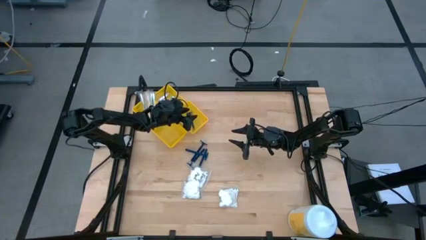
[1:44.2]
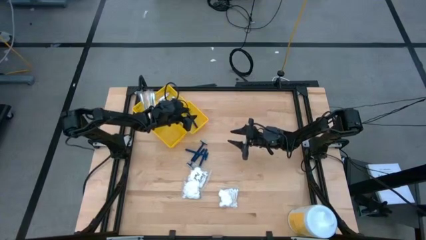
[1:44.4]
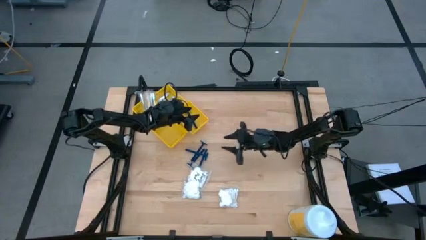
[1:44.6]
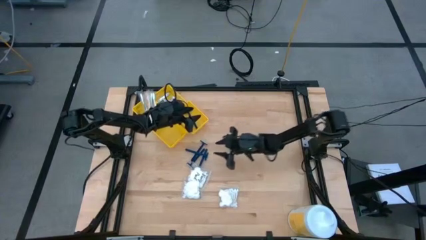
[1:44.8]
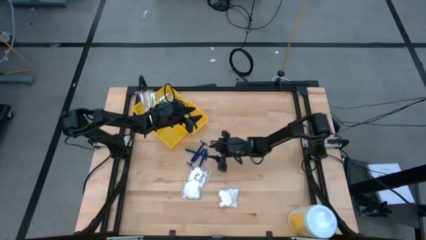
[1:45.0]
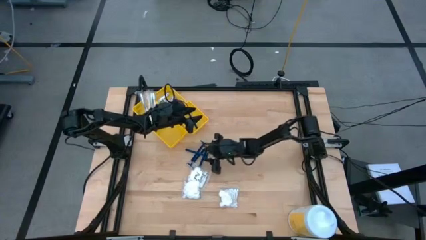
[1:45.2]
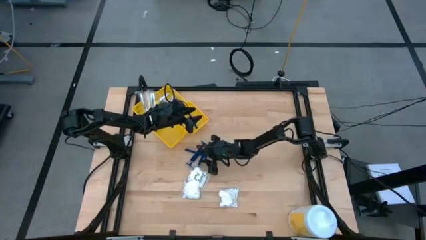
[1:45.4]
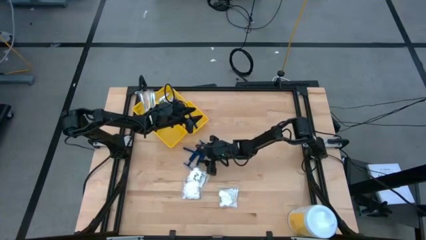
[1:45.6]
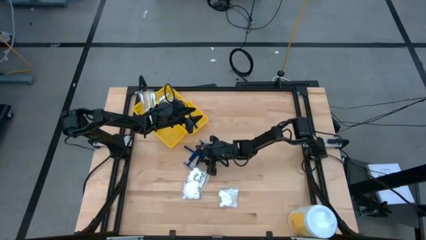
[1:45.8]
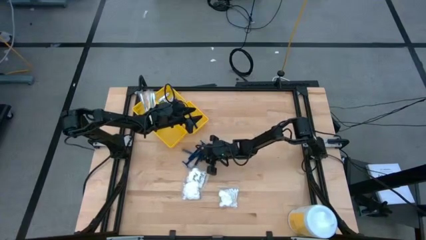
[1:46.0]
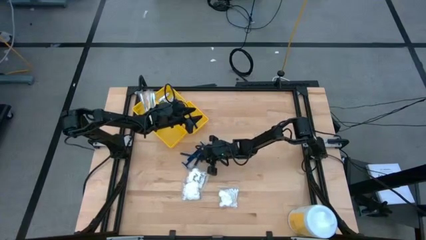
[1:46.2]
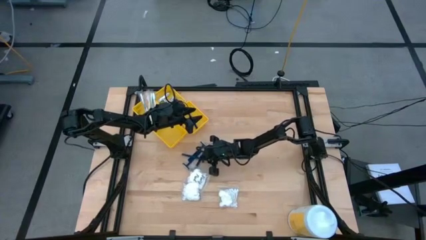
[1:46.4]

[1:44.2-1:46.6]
Task: Pick & Place Travel size toiletries
Put the blue razor into the middle right yellow bin

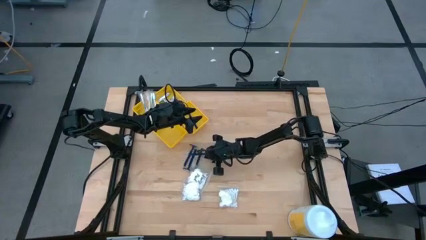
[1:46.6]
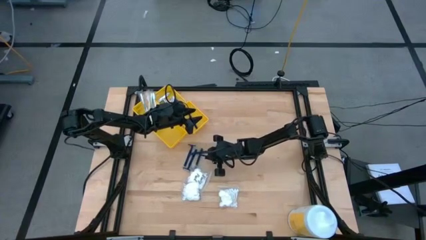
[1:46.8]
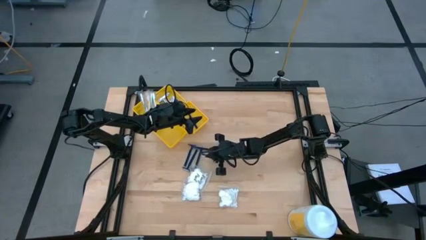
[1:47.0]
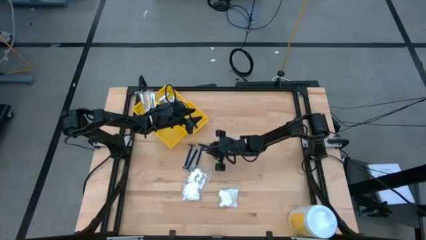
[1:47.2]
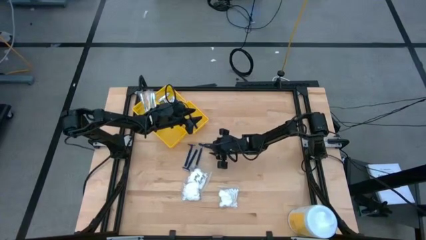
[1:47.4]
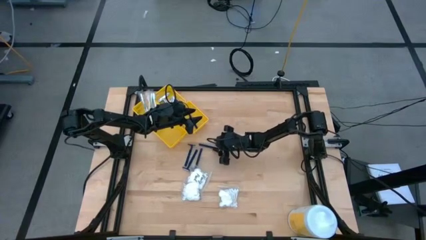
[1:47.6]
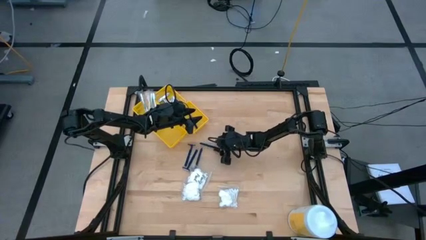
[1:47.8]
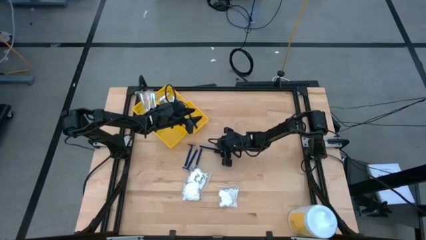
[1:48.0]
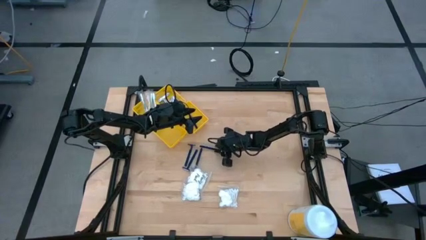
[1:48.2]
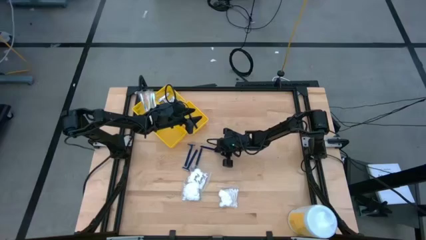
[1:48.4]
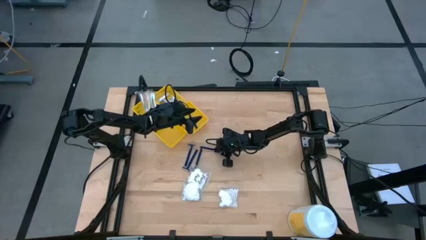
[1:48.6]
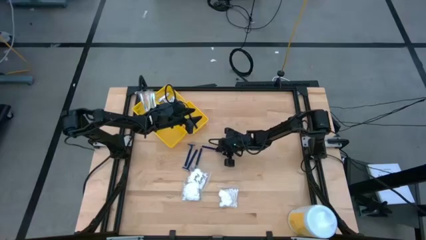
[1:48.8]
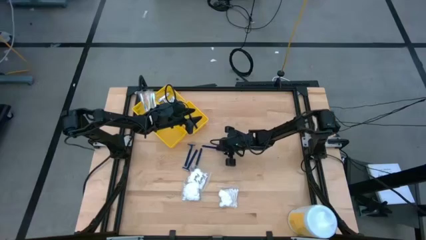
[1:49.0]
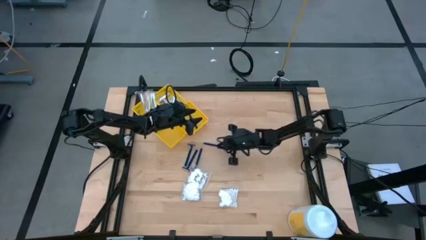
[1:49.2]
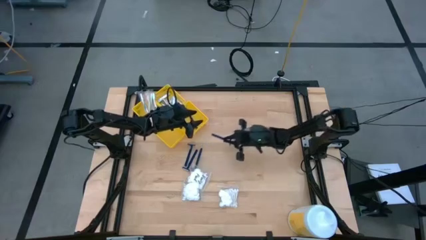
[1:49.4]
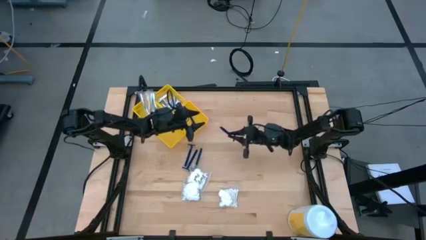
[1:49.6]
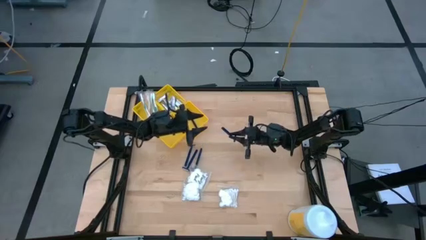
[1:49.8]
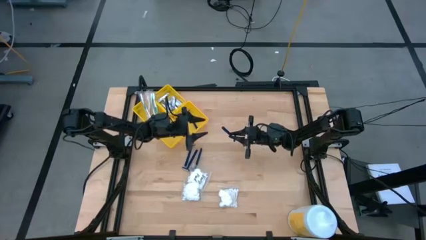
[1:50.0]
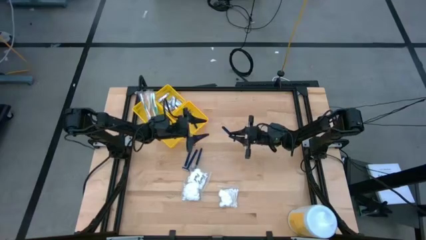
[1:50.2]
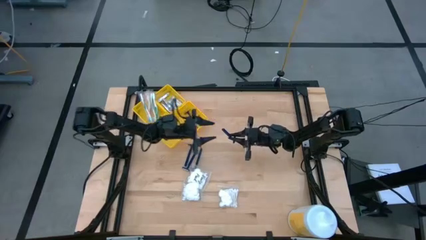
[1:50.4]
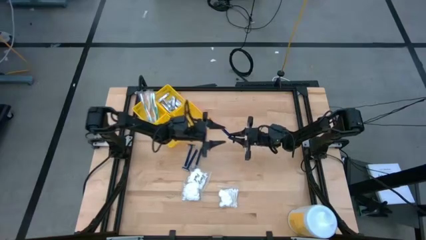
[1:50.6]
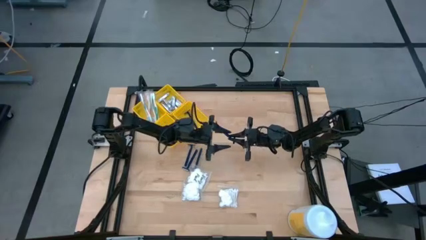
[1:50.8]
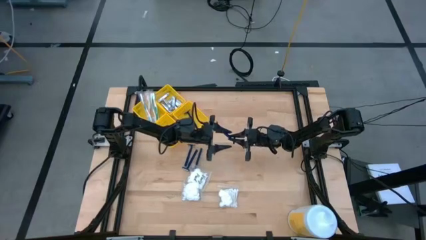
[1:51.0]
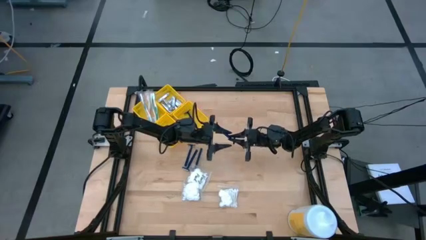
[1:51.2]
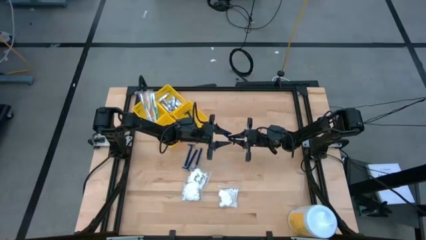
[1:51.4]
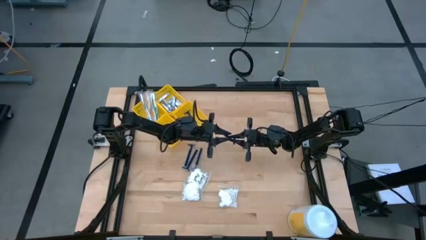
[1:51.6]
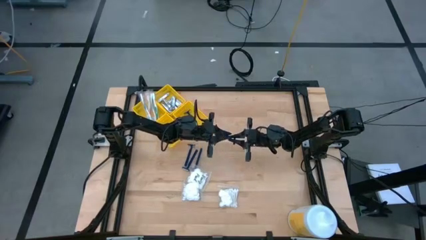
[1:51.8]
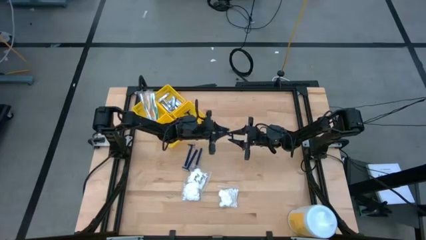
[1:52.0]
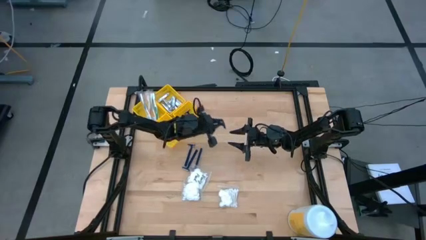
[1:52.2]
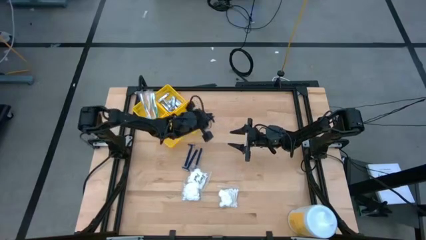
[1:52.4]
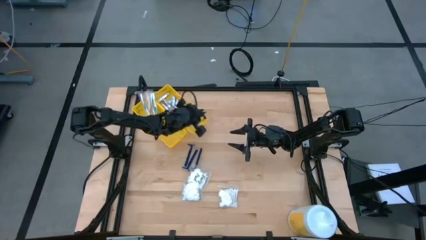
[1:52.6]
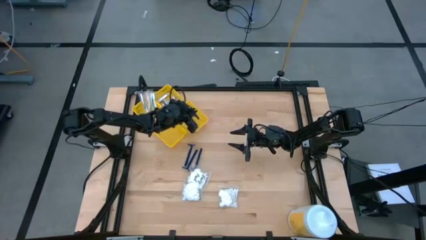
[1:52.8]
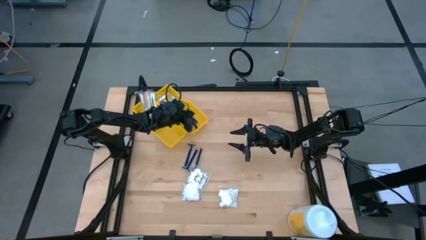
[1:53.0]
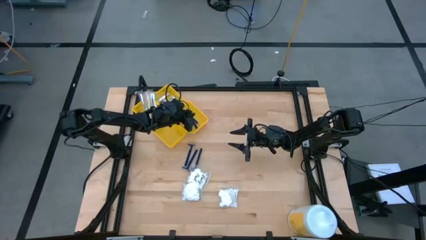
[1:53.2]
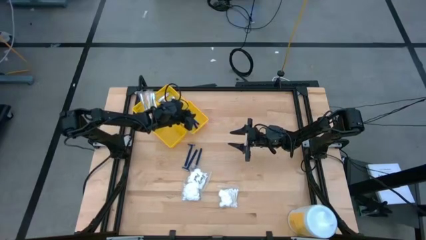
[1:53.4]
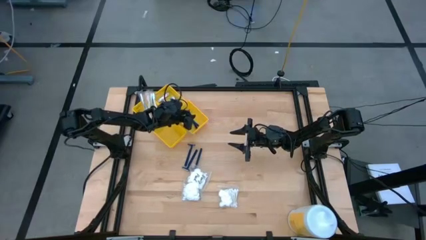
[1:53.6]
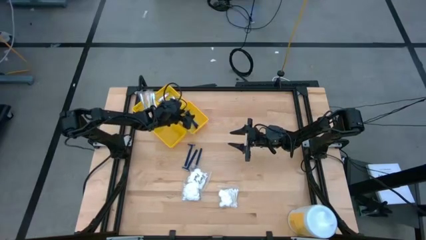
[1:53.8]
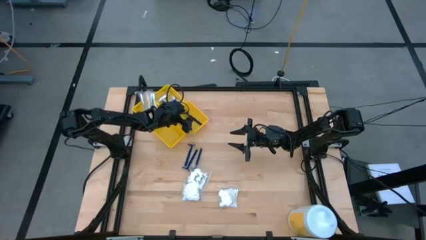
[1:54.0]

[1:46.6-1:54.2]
Put the blue razor into the middle right yellow bin

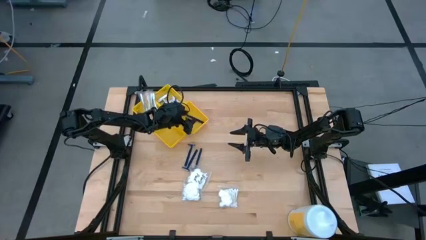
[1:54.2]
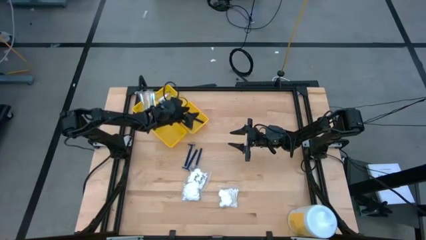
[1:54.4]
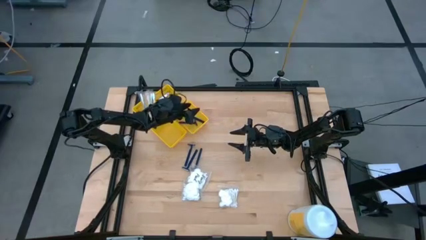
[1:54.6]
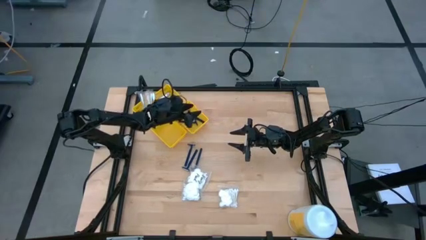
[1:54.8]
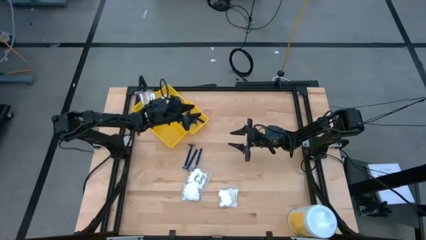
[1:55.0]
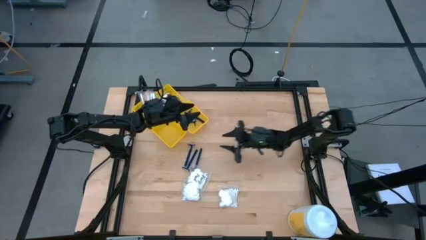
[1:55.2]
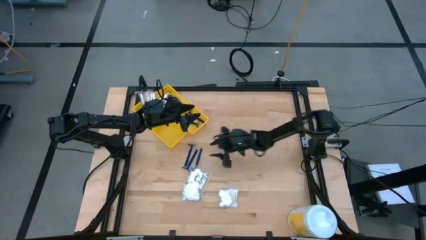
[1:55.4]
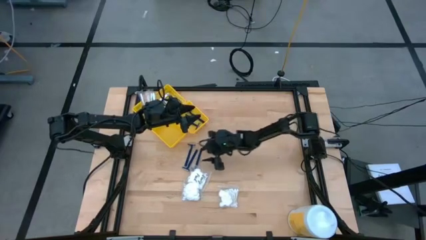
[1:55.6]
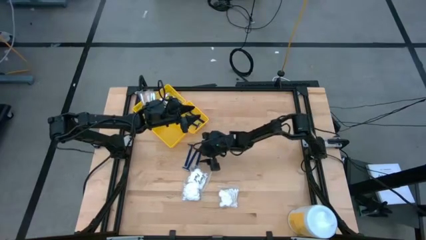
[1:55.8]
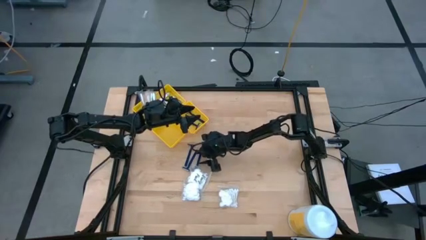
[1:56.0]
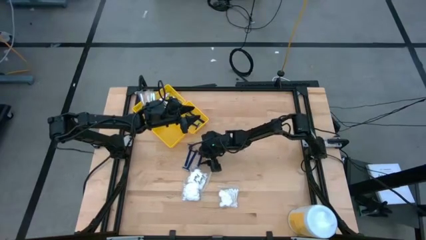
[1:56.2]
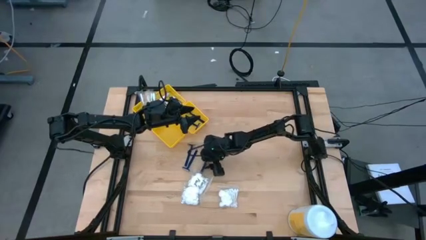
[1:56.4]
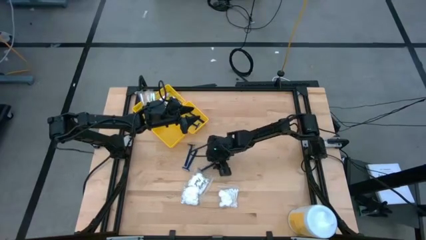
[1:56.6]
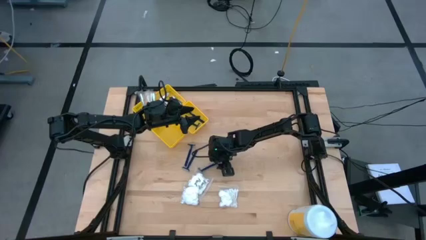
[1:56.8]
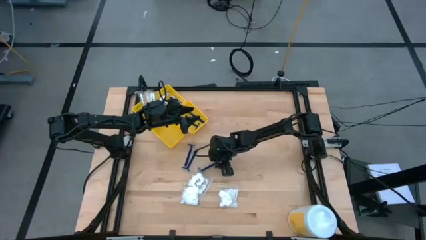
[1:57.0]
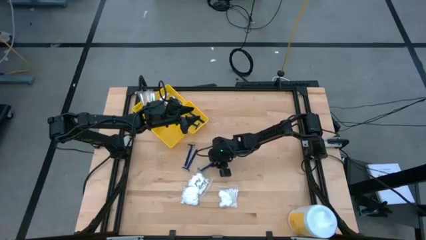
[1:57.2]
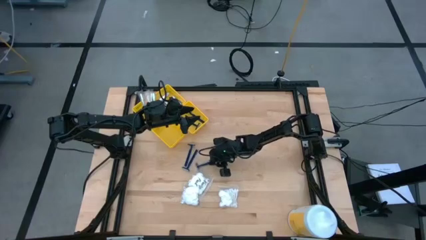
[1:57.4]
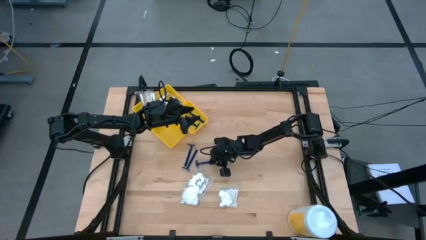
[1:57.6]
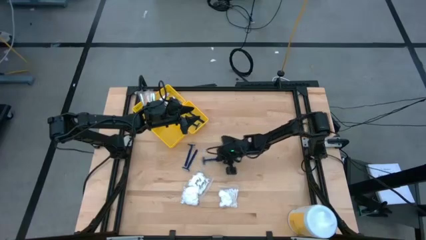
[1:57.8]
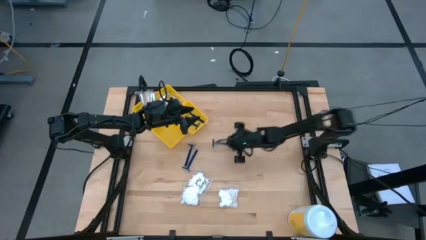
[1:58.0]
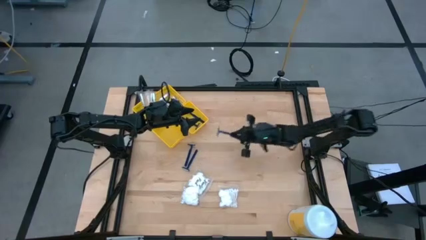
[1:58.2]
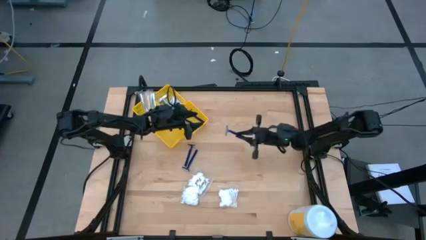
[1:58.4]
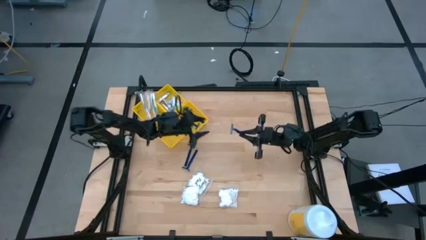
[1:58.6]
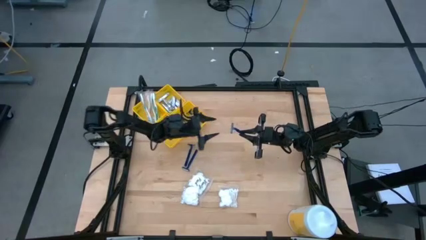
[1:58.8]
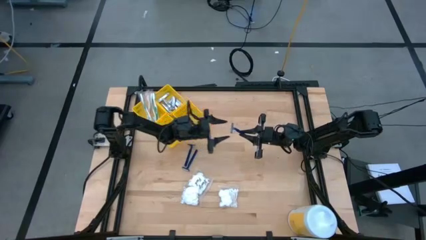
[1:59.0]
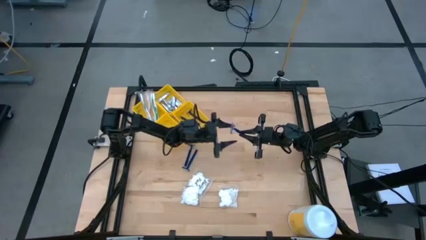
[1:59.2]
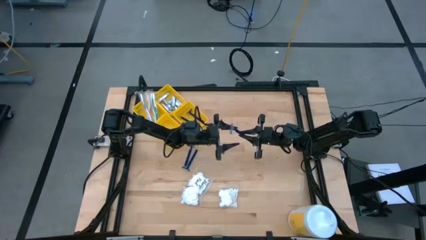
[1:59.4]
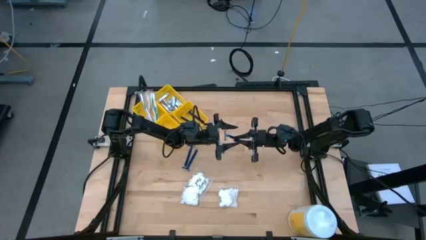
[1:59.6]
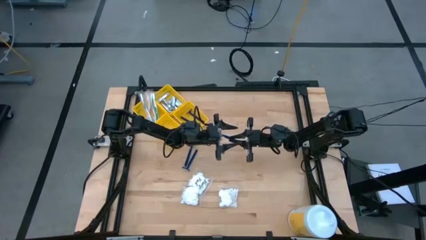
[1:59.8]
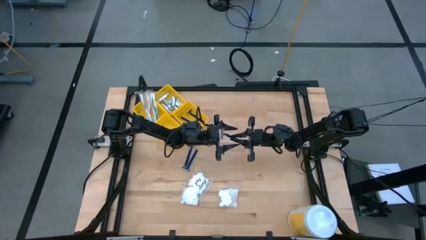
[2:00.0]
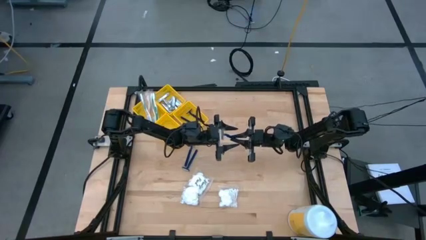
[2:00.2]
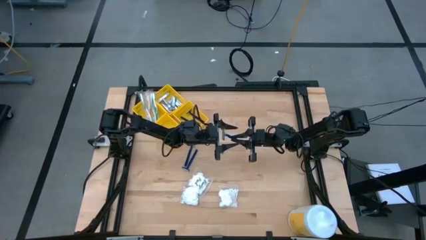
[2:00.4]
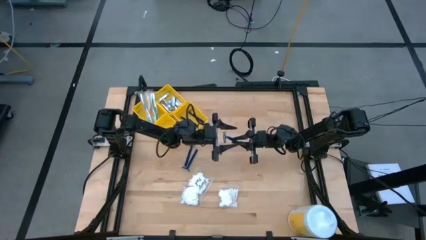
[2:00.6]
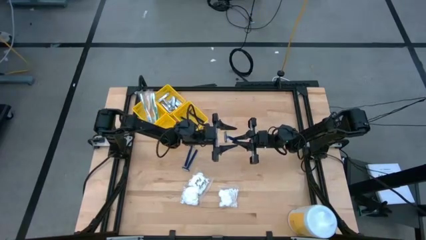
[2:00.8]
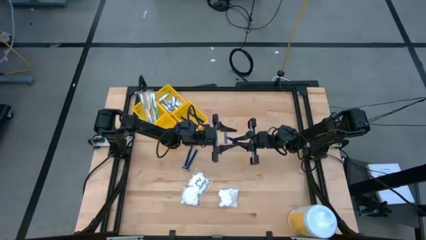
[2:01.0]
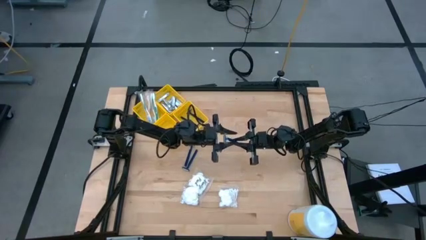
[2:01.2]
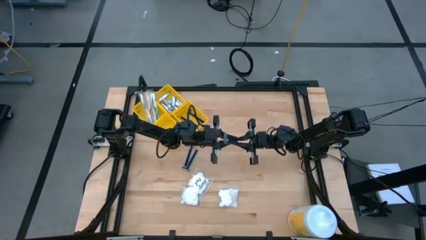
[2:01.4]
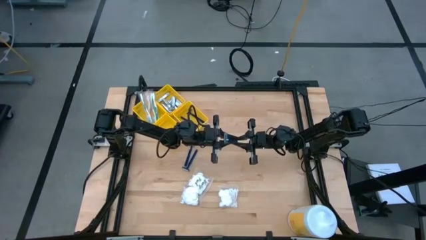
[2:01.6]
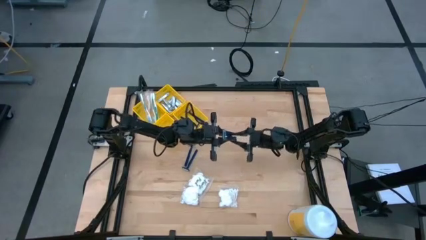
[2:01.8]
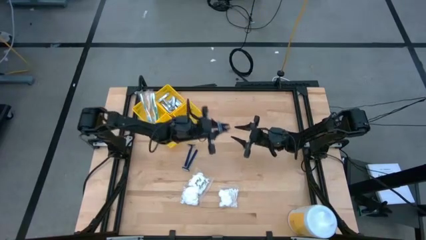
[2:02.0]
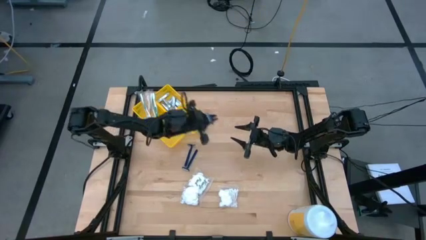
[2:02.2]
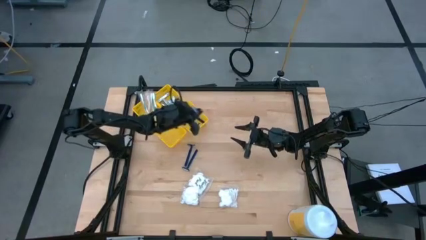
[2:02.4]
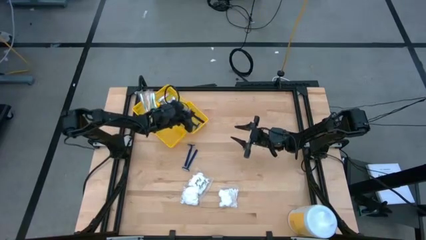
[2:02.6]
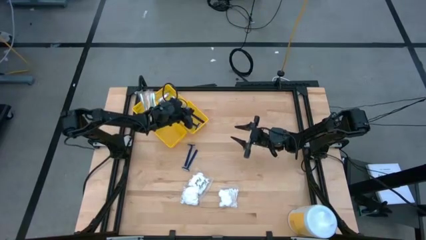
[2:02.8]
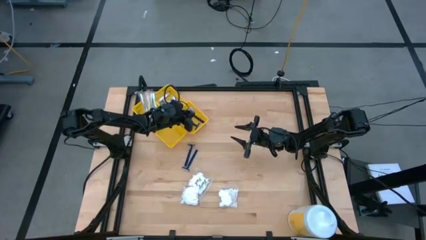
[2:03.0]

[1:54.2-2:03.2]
Put the blue razor into the middle right yellow bin
